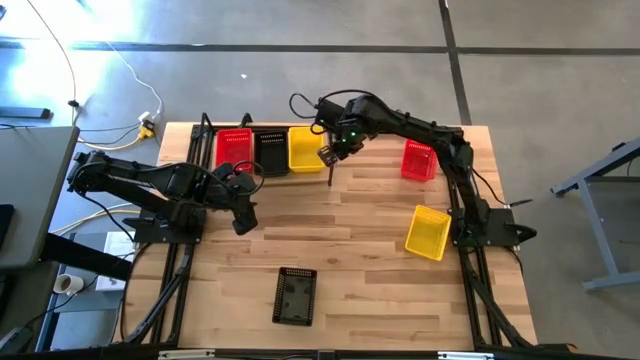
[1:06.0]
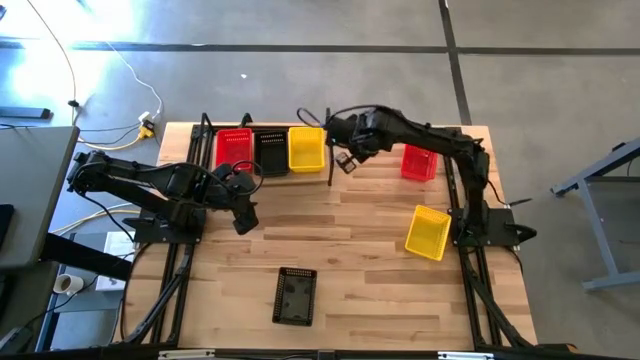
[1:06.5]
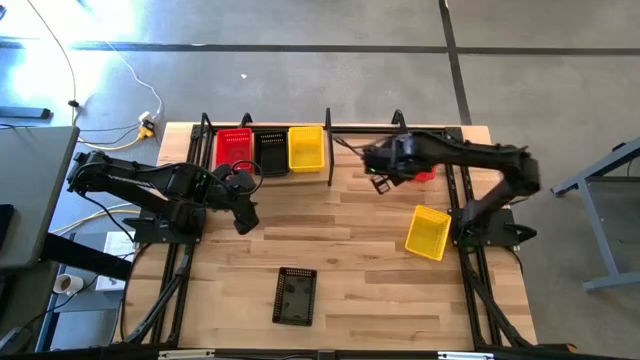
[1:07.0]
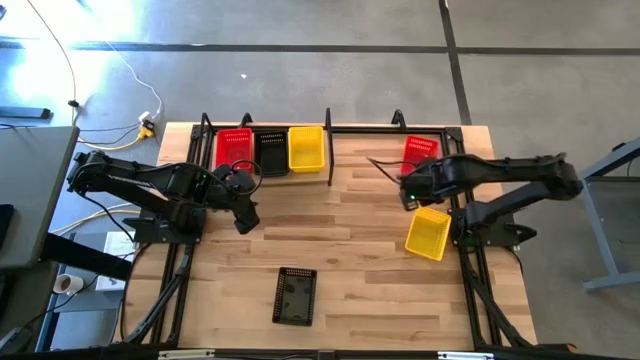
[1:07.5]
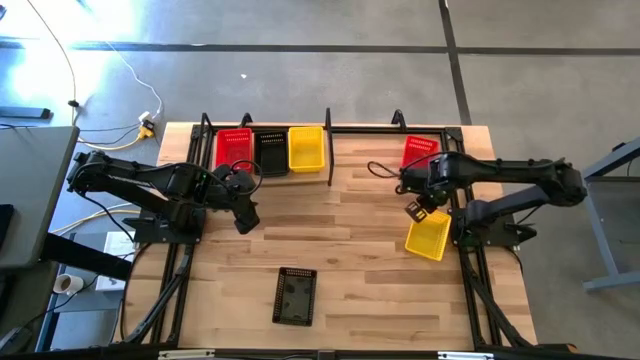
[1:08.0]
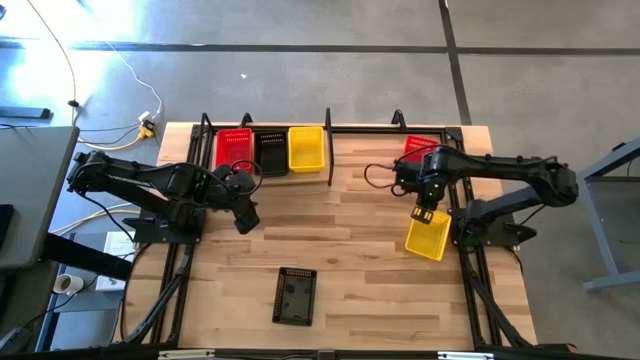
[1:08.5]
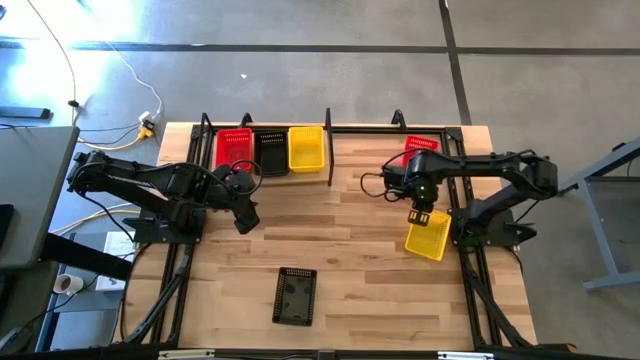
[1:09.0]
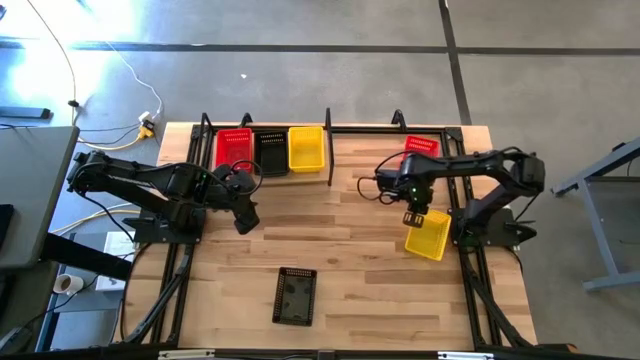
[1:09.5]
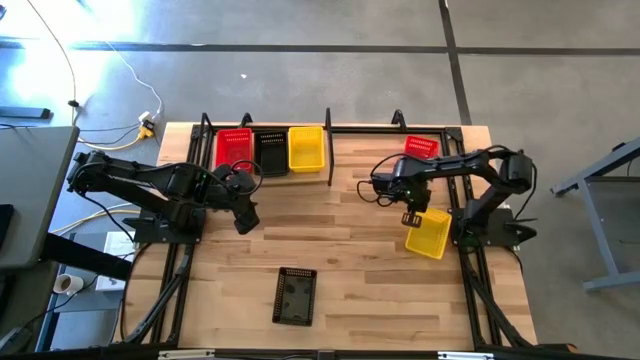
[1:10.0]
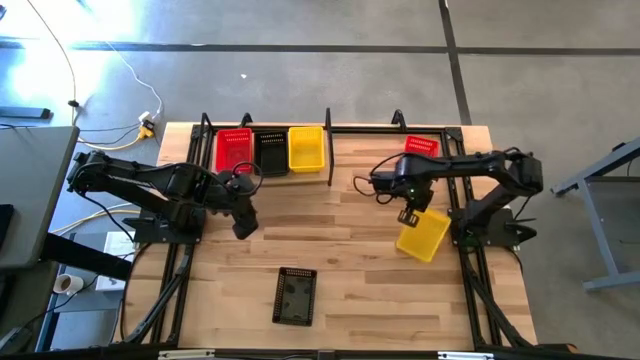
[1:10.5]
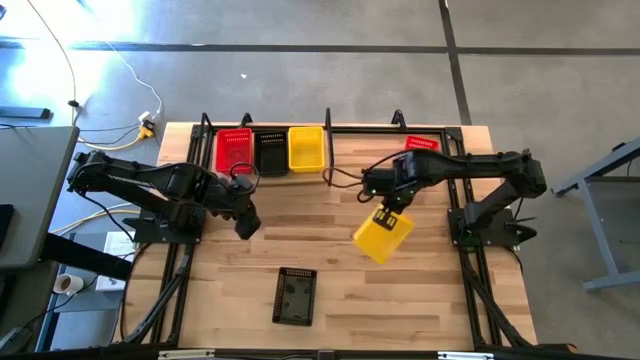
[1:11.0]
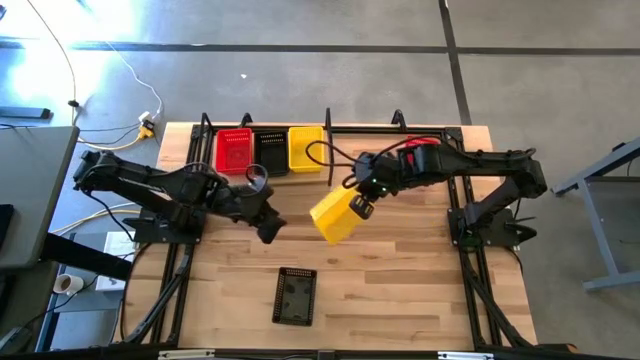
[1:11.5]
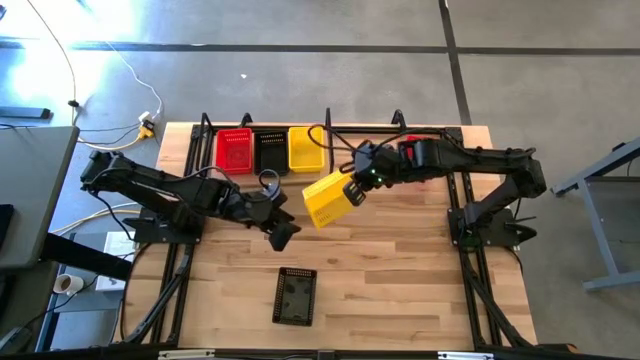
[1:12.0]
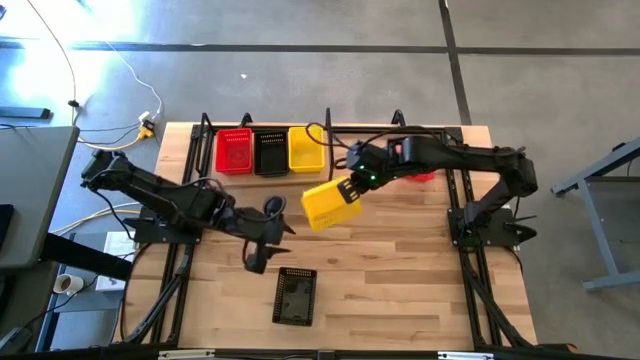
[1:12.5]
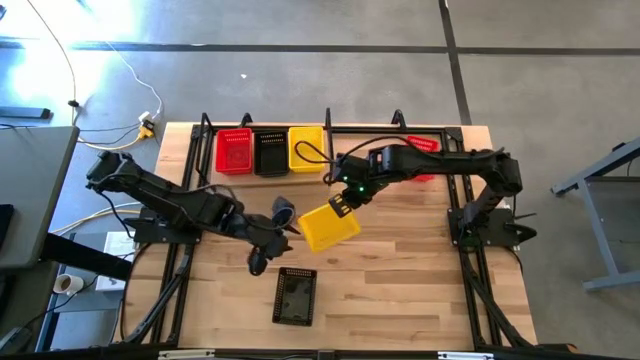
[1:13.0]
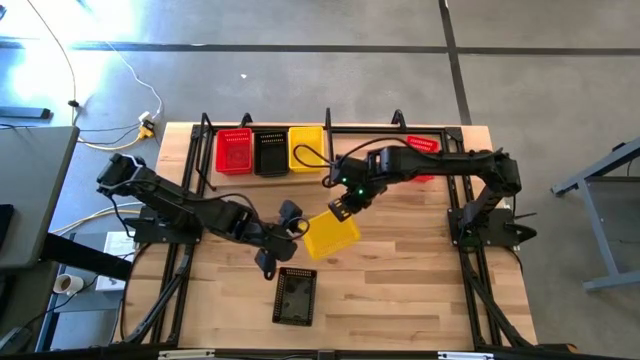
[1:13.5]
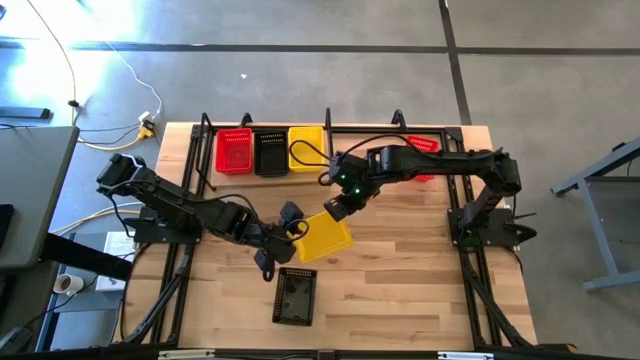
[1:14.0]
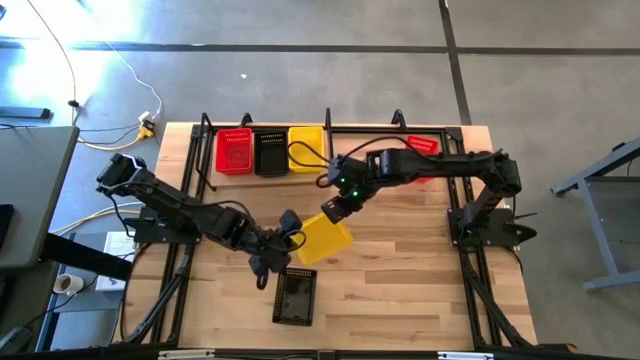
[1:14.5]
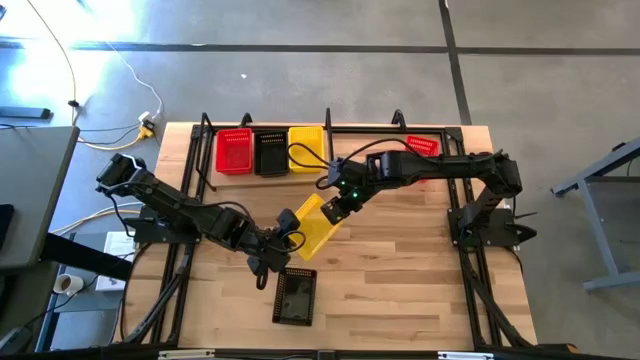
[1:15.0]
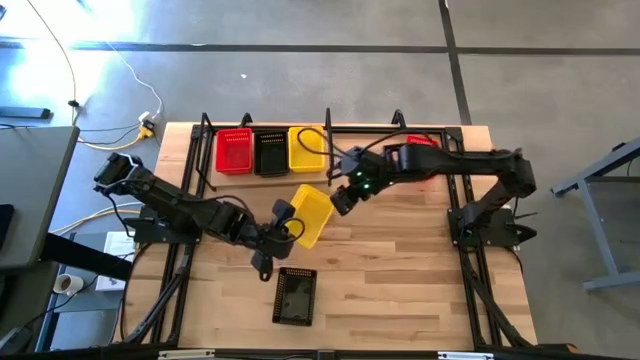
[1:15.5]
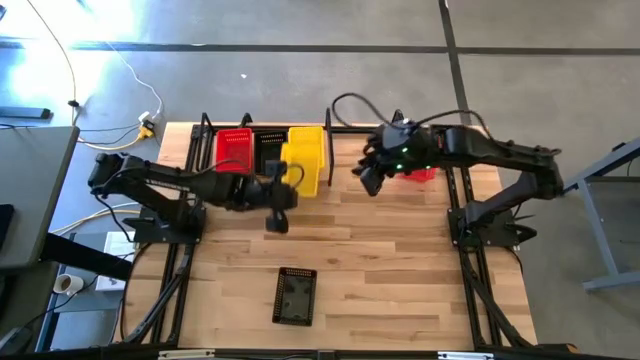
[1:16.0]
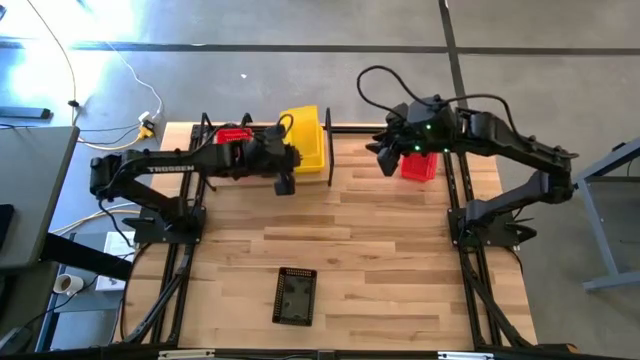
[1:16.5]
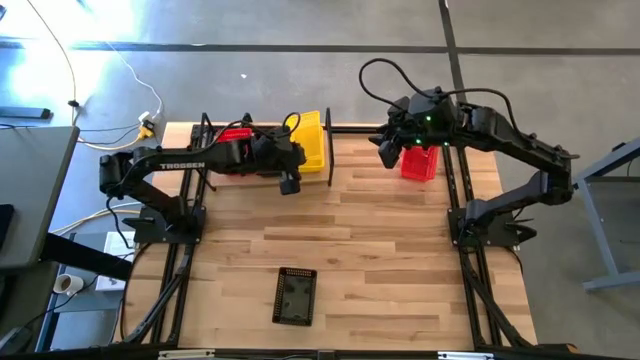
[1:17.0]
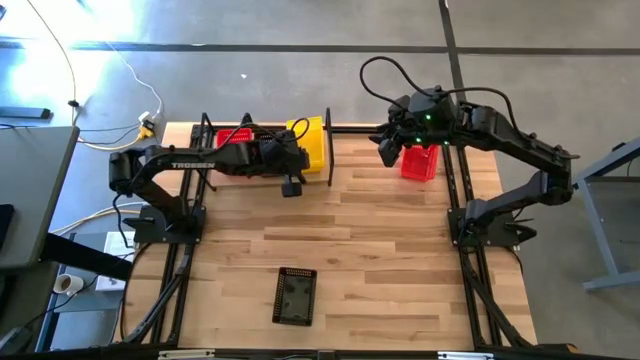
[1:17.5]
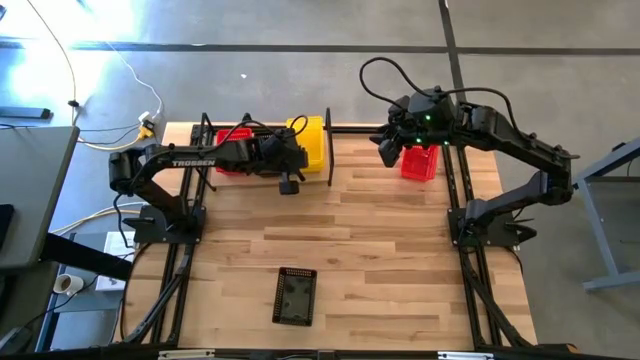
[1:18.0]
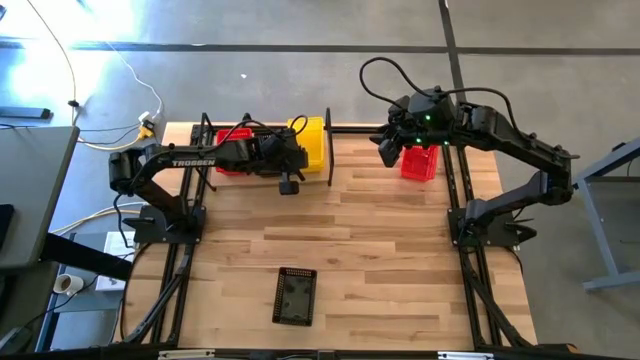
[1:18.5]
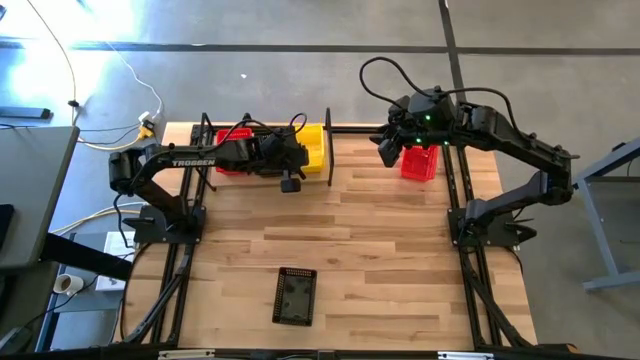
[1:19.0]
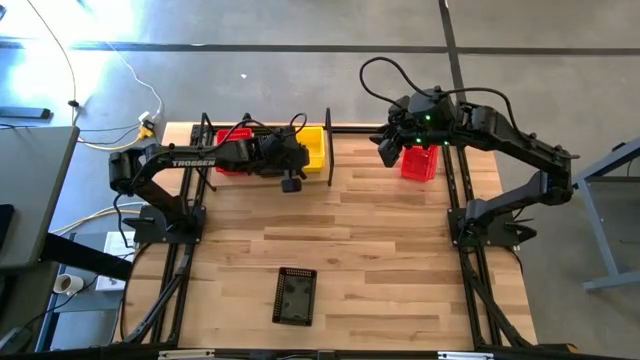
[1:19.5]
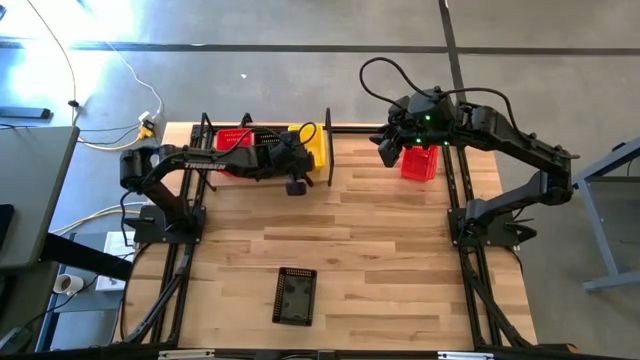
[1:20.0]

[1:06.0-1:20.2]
Task: Stack baskets on shelf by color
Stack the yellow bin on top of the yellow bin

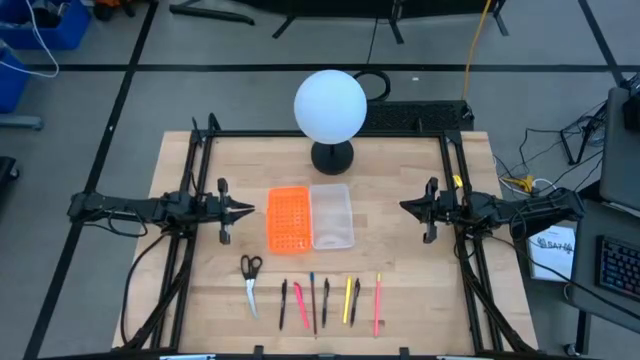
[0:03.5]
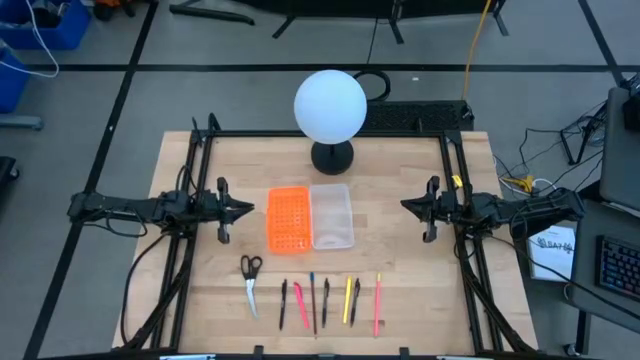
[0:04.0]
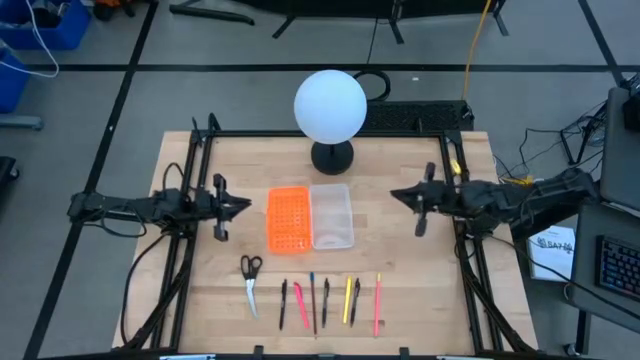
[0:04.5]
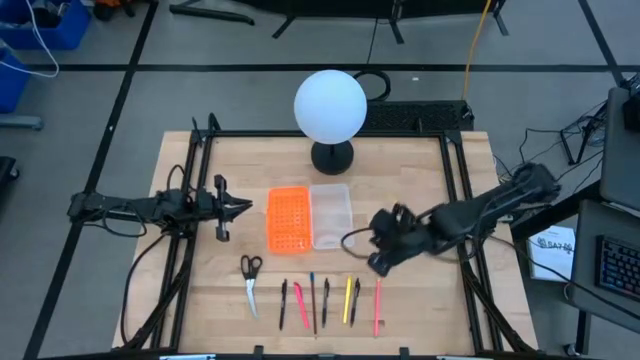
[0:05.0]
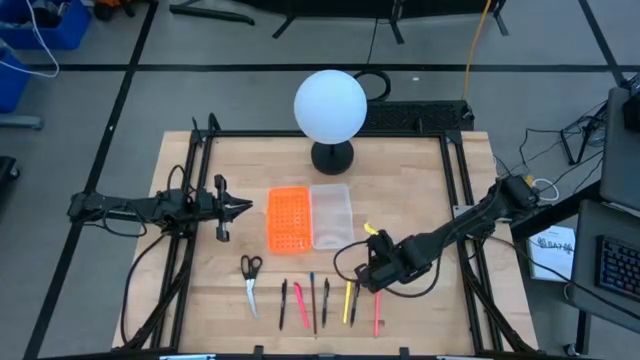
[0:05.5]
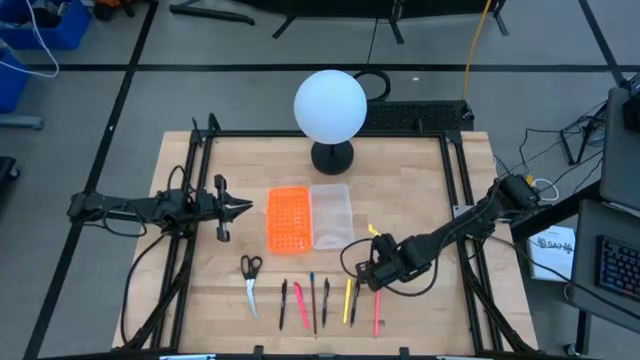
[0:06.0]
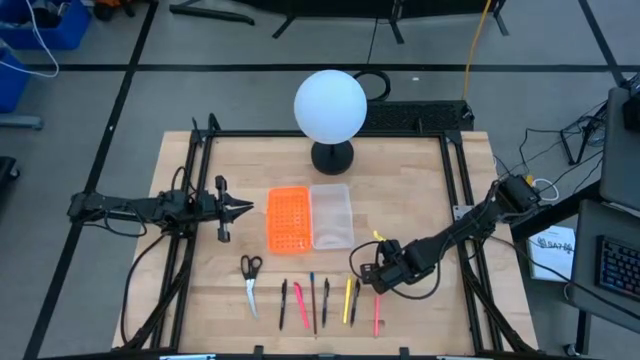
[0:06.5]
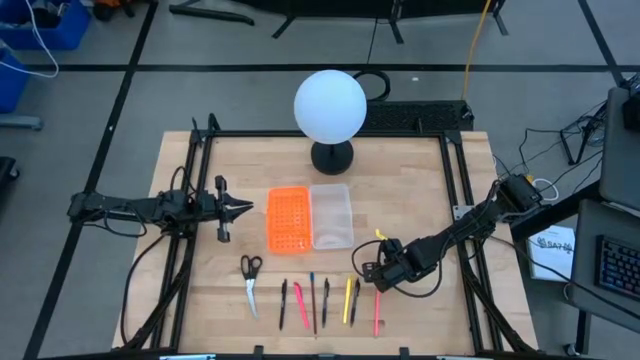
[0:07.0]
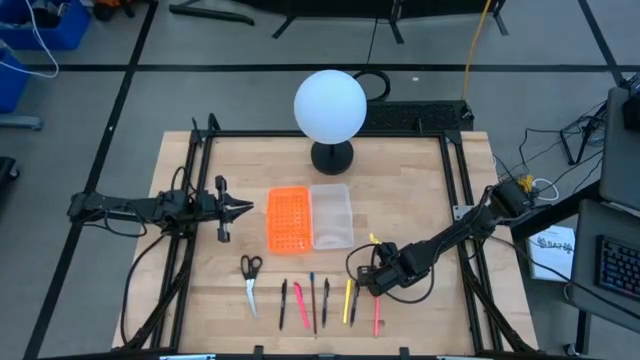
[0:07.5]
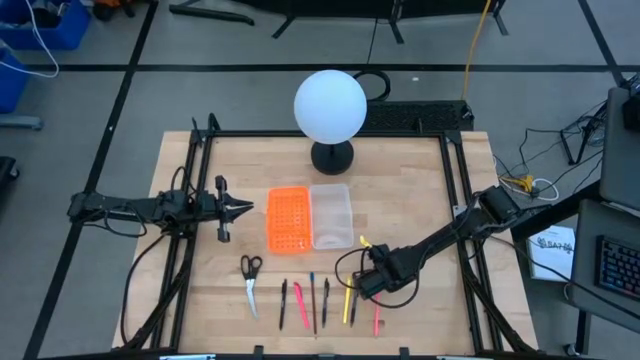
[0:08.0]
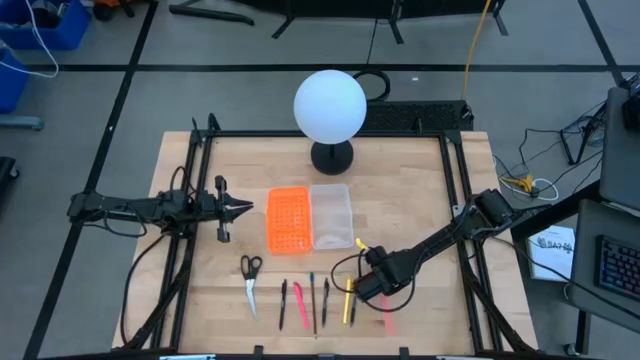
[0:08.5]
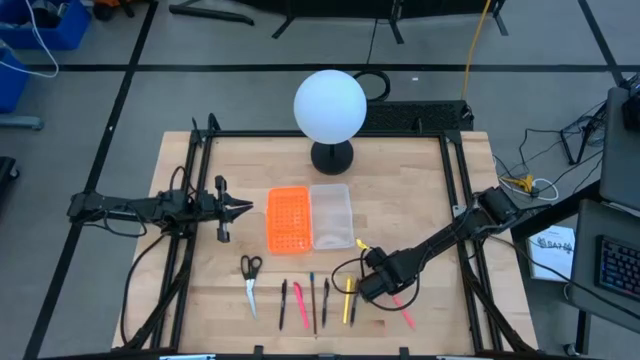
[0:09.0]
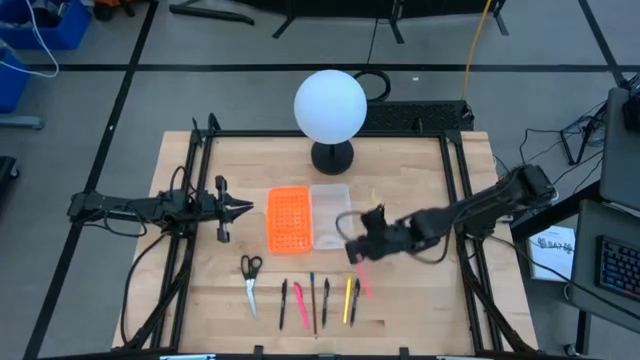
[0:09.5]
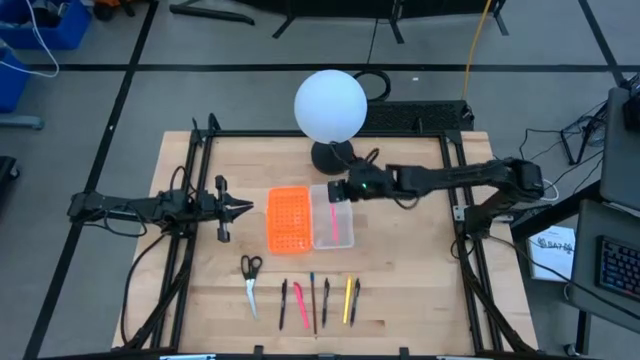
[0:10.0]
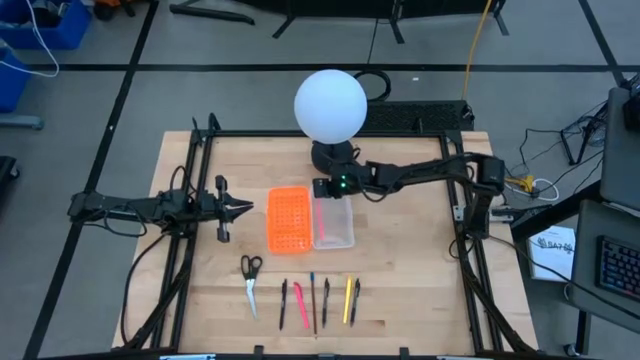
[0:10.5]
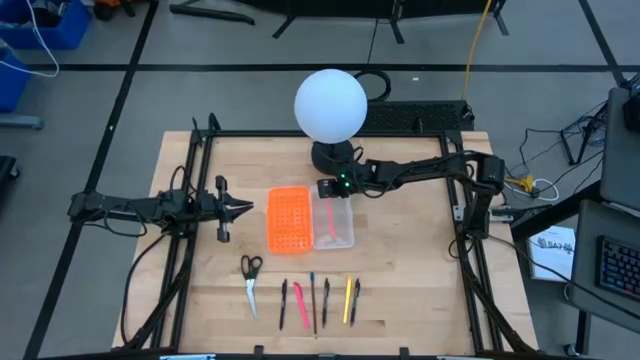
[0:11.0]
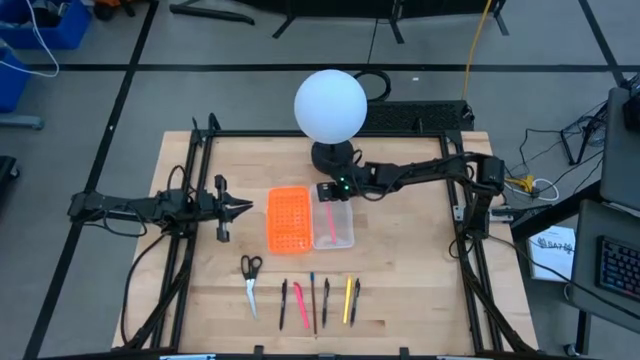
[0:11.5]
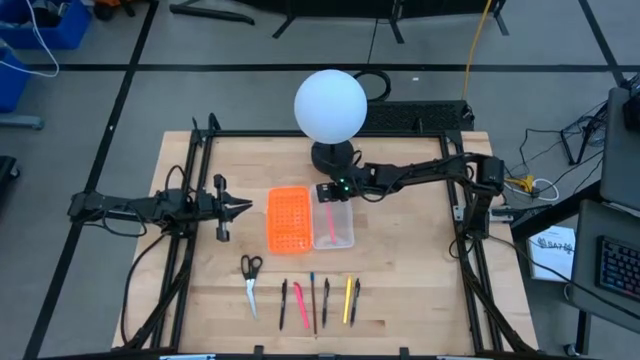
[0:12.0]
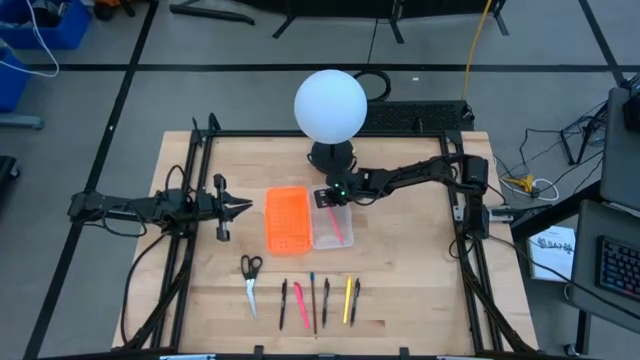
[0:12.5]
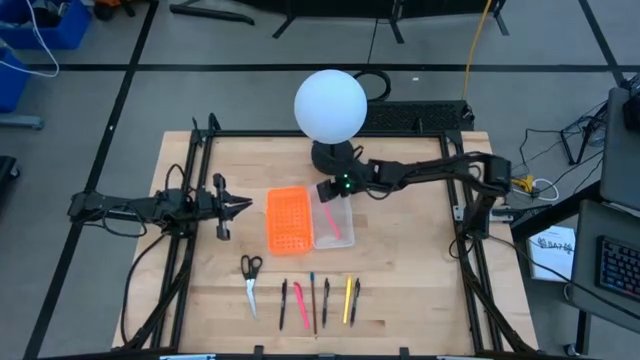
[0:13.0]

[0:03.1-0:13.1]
Task: Pick & place school supplies into a supply box
Put the pink pencil into the supply box
